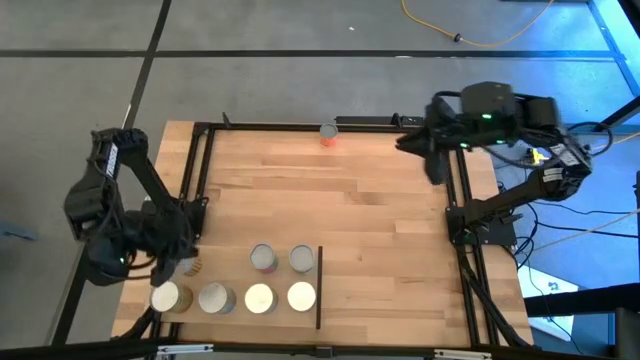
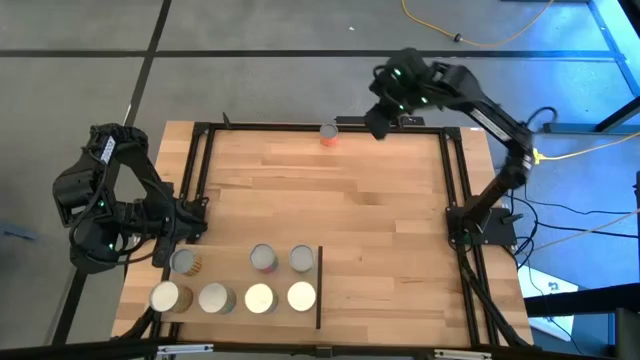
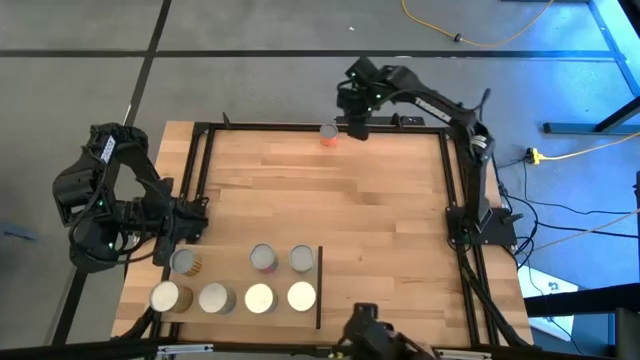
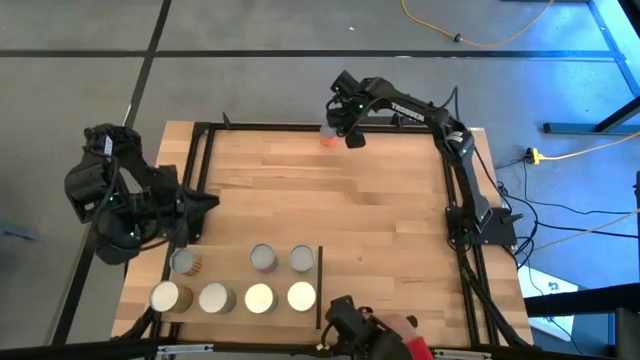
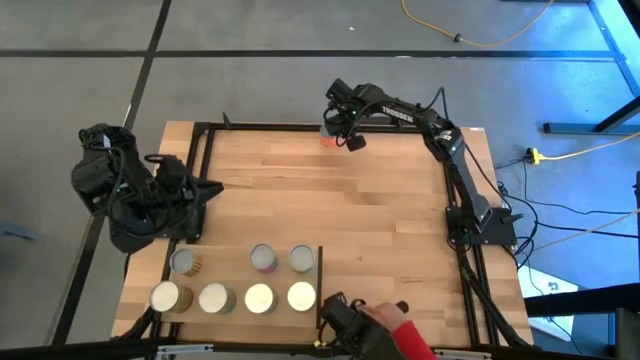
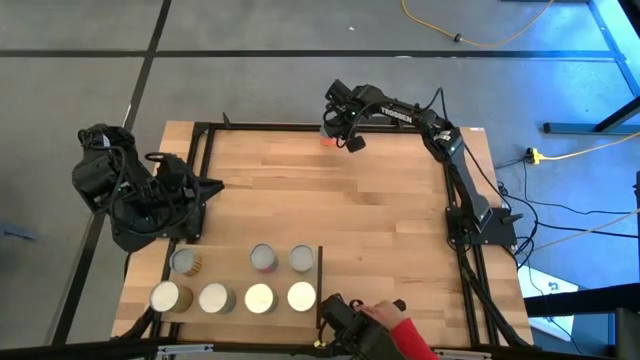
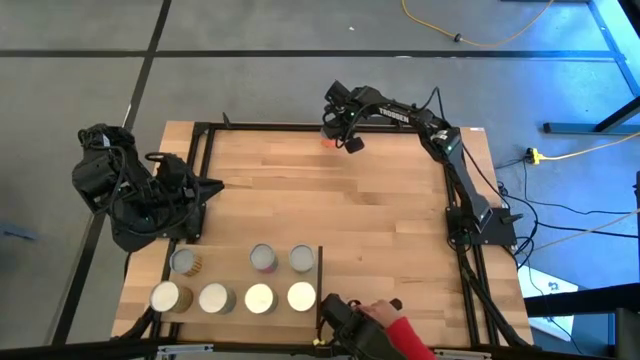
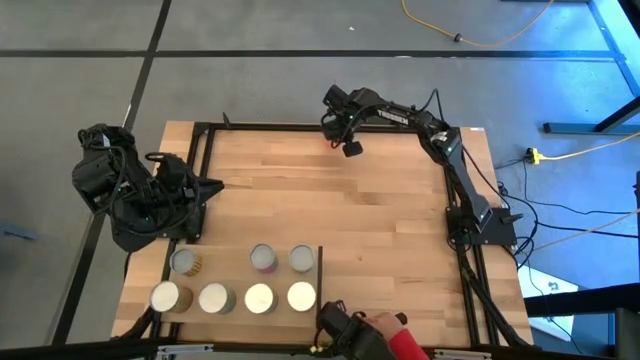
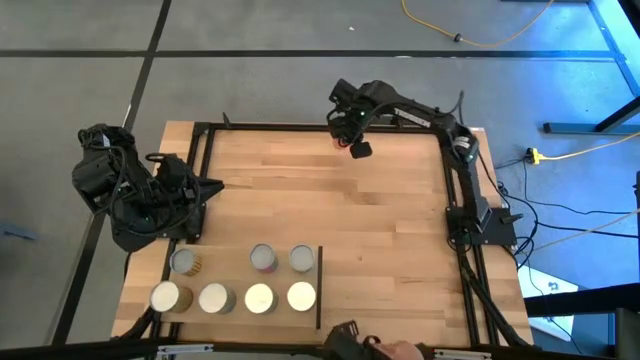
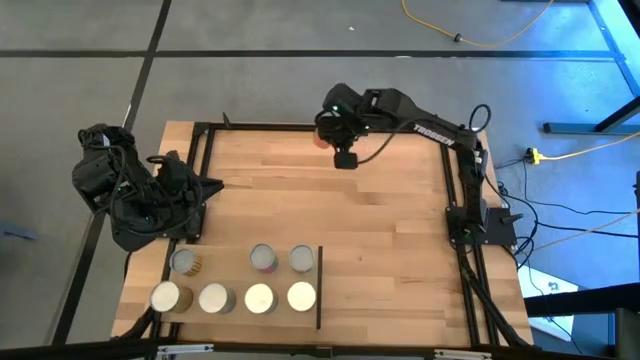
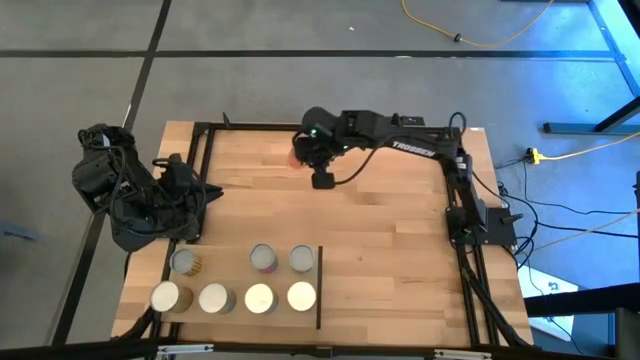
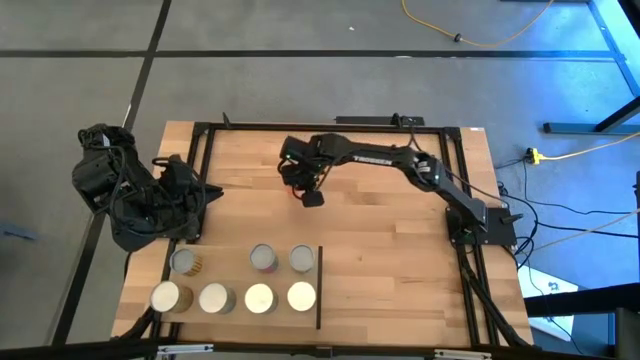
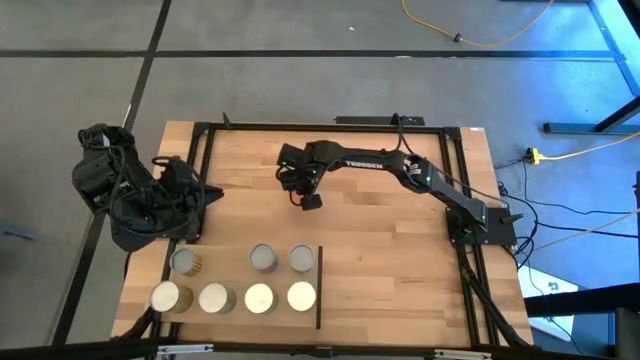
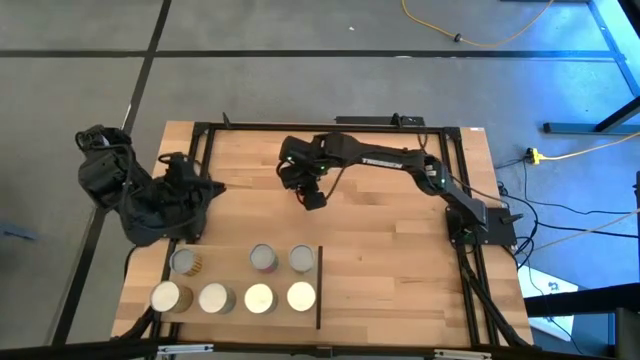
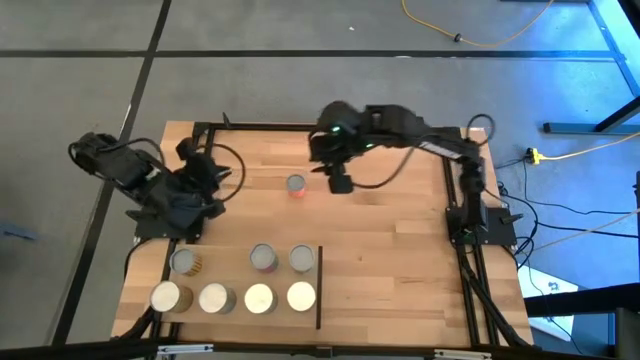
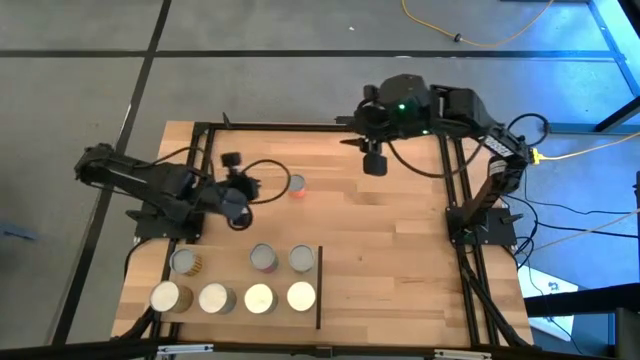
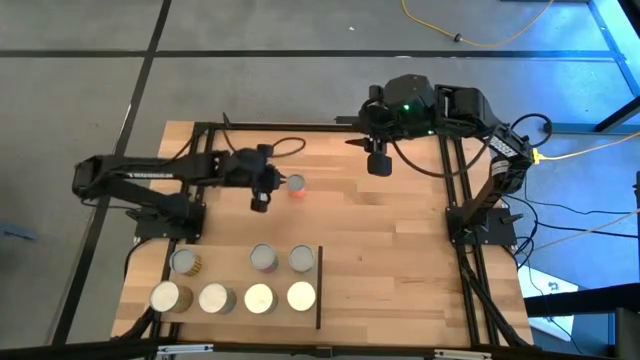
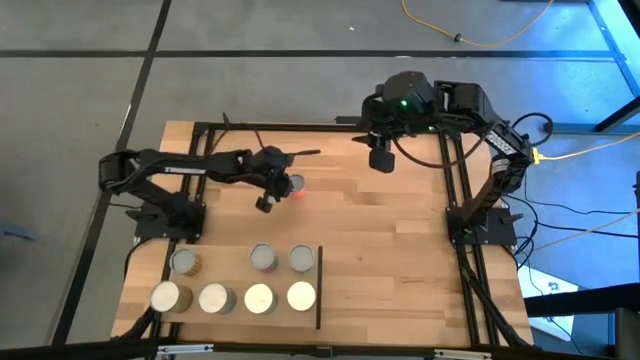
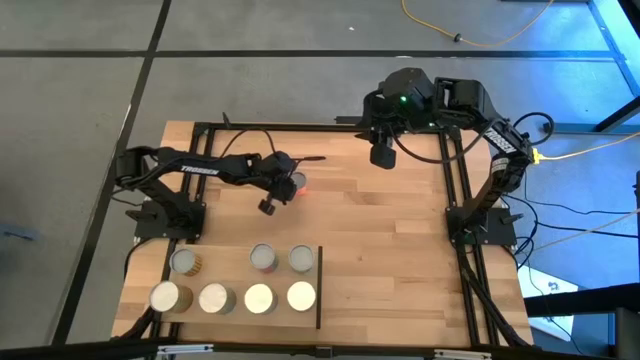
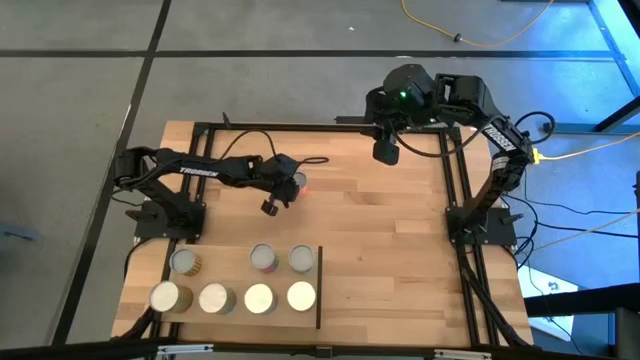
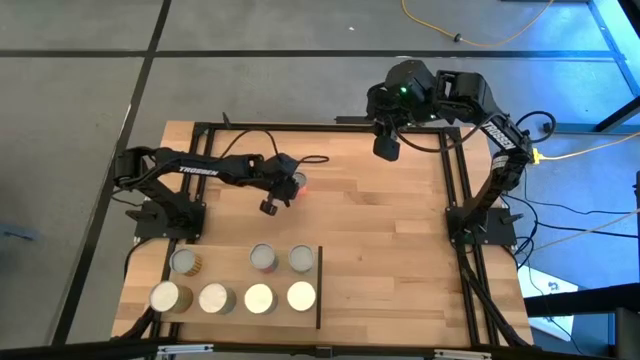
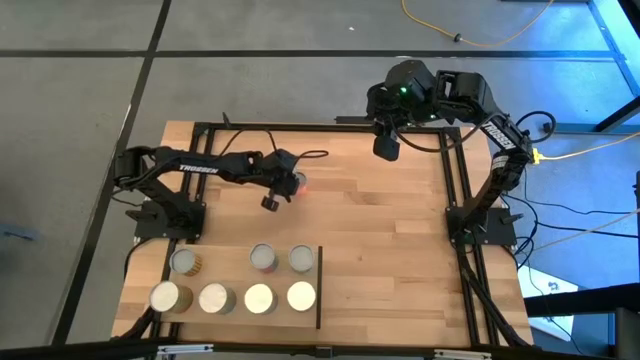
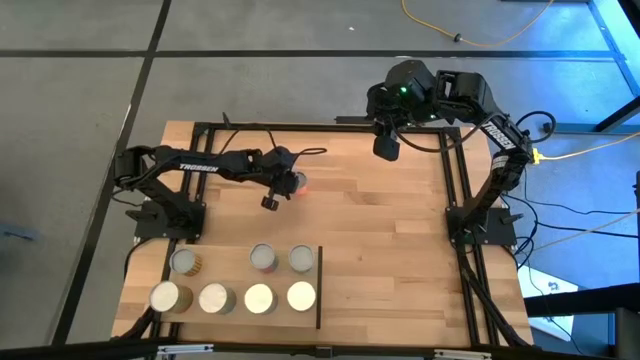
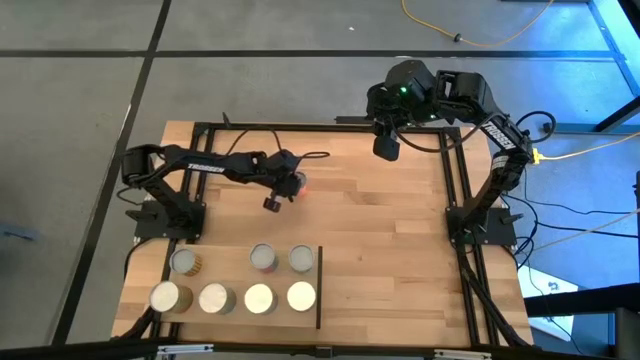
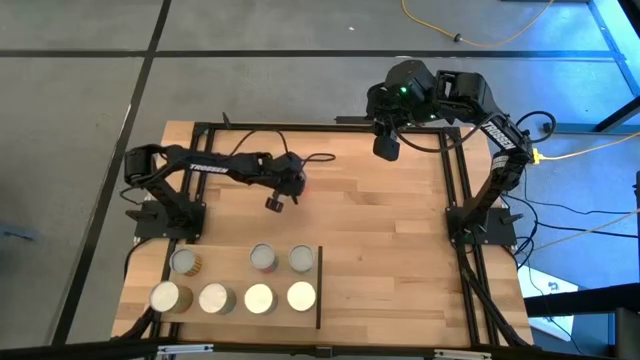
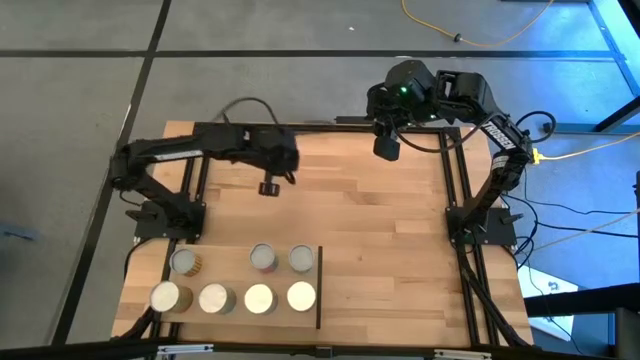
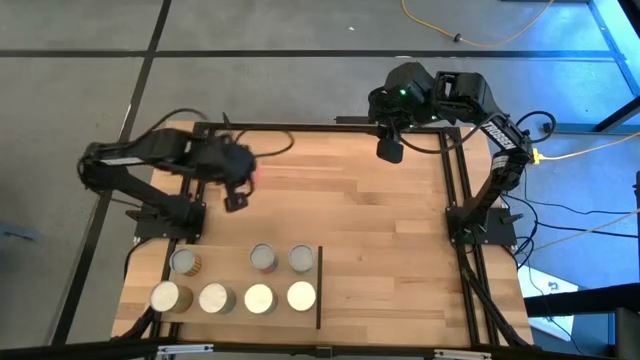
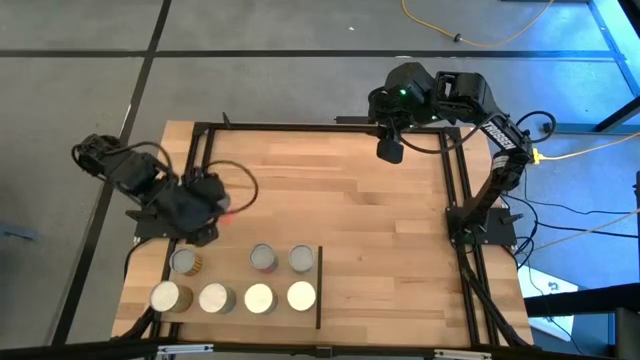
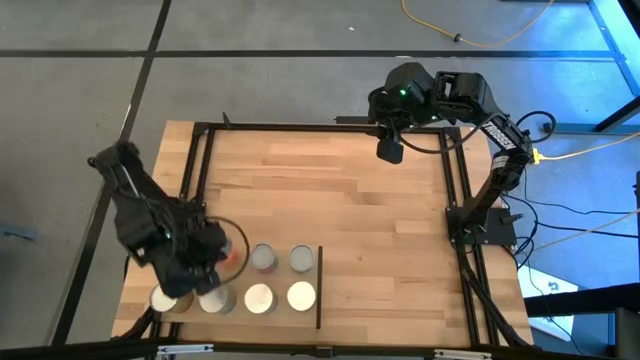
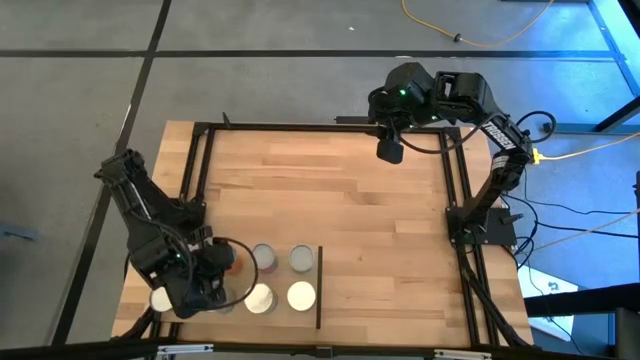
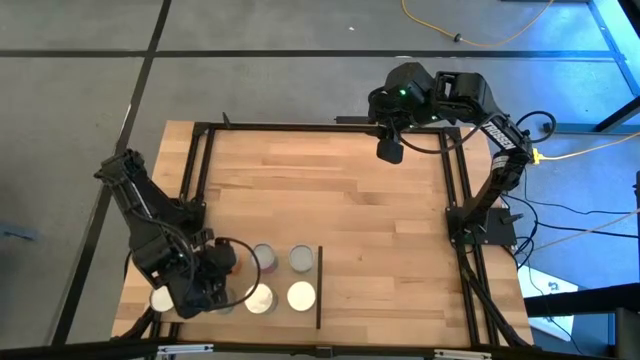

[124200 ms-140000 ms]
Task: Pick and place cans onto a shelf
Put the orange can on the shelf

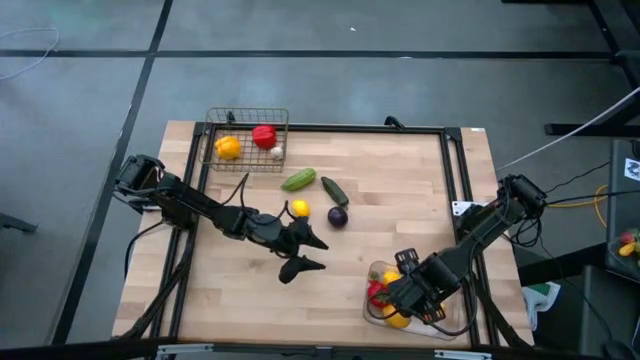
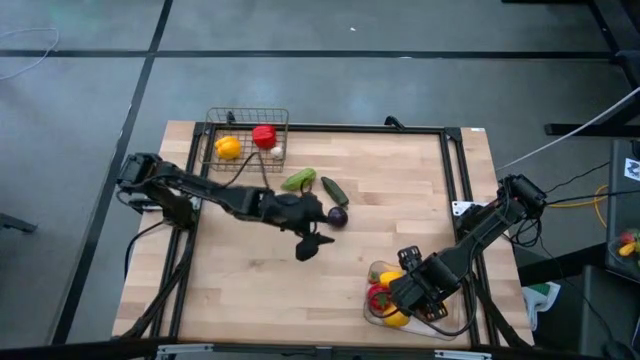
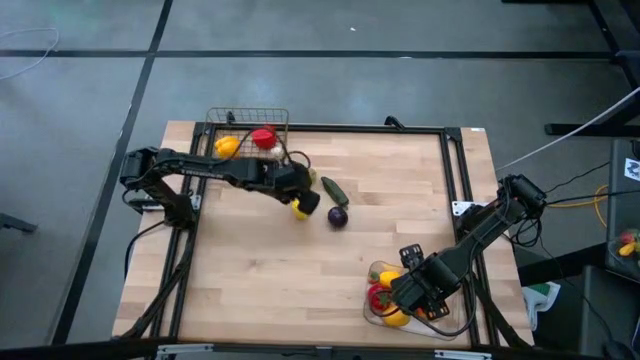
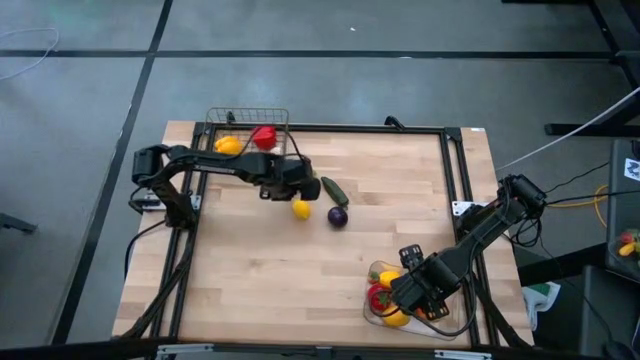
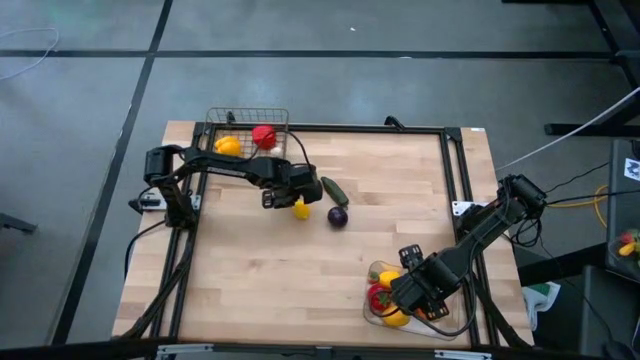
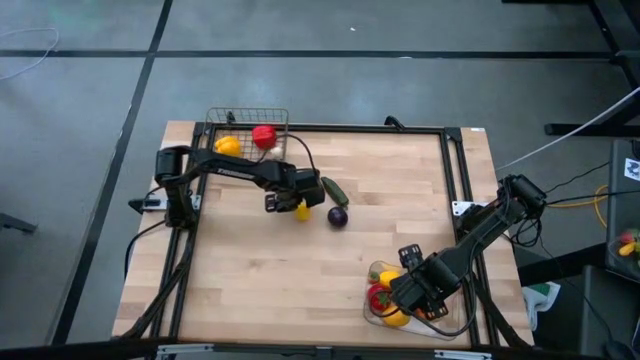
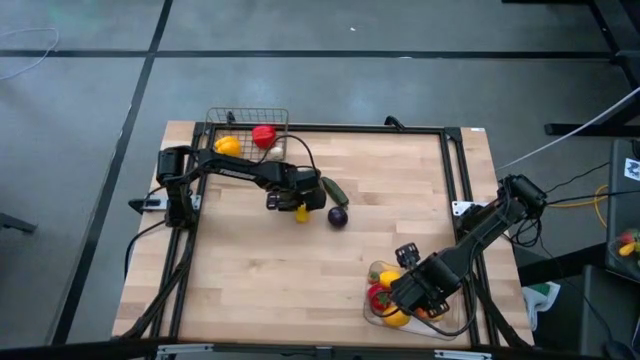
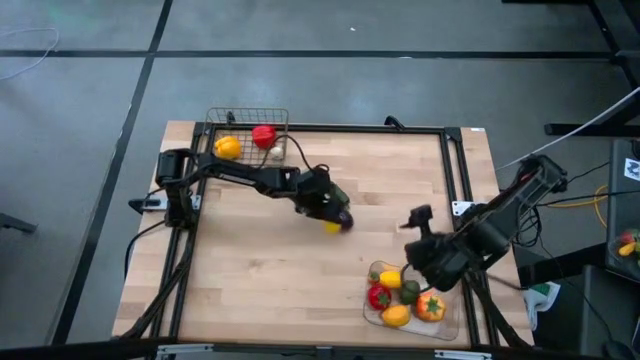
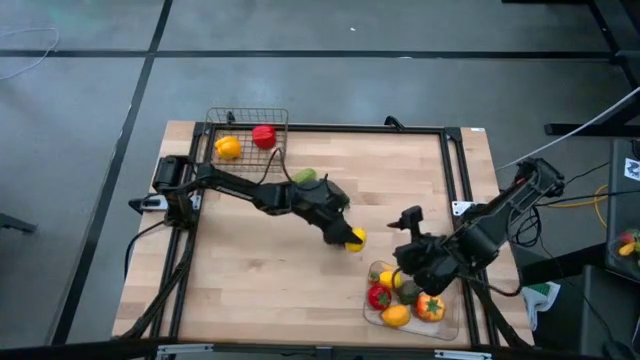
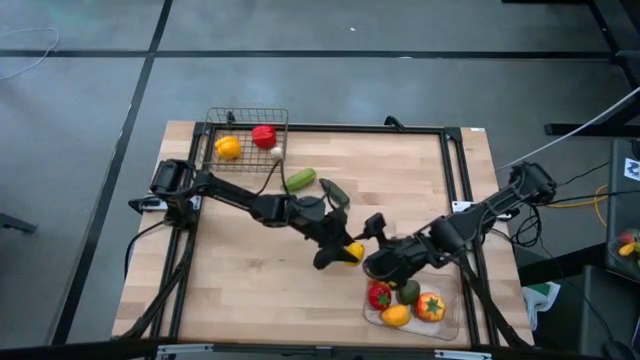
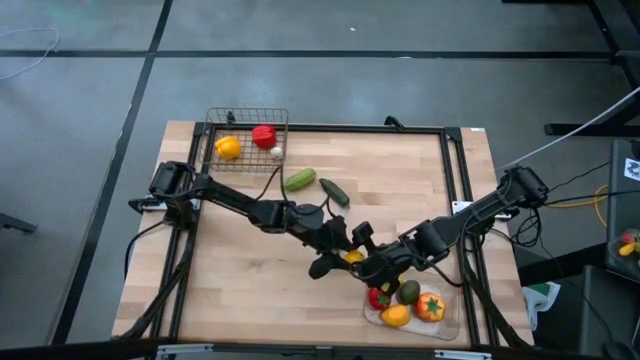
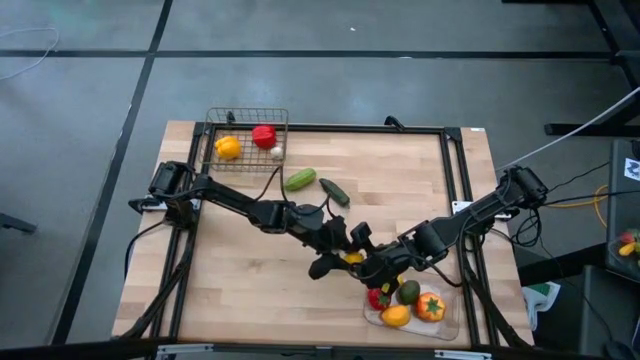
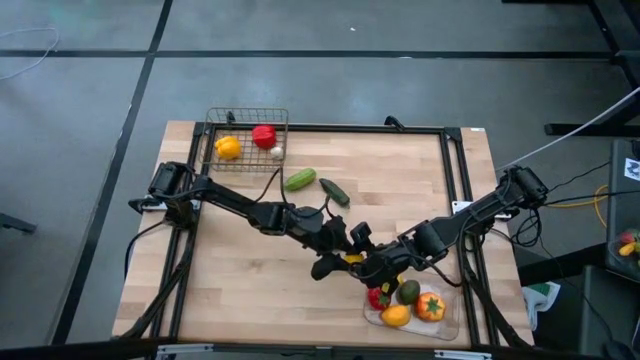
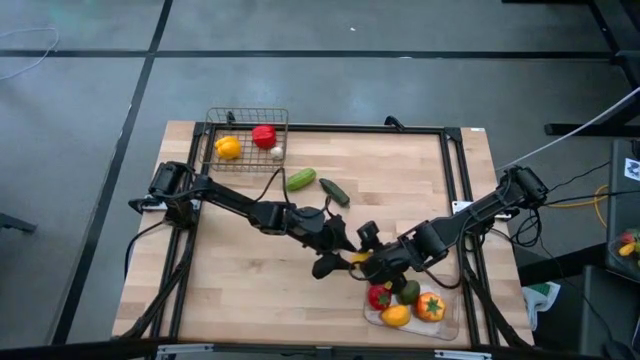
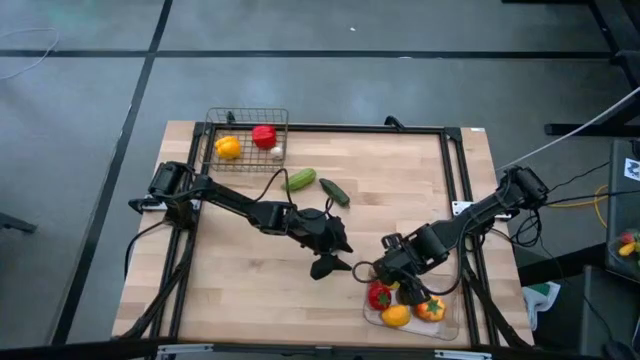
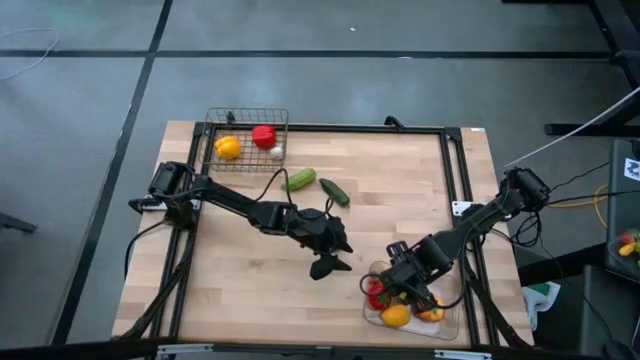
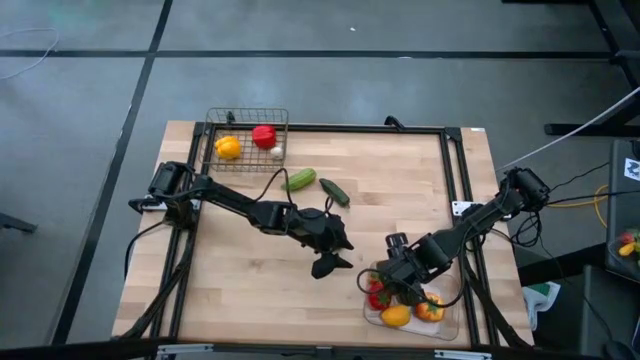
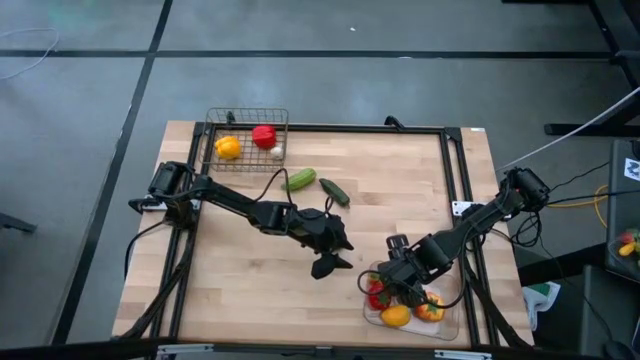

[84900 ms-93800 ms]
Task: Sort produce into baskets
Put the lemon into the transparent bin
